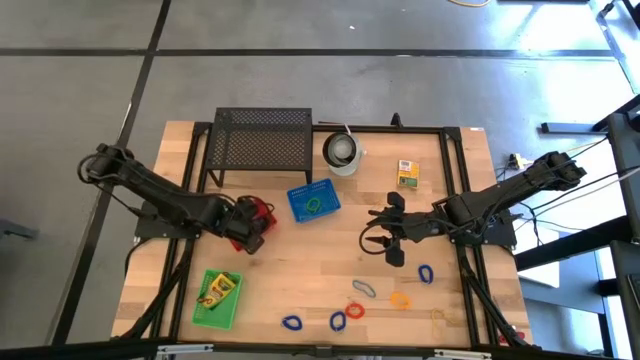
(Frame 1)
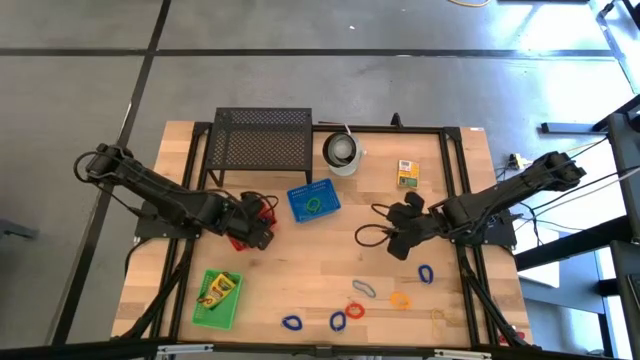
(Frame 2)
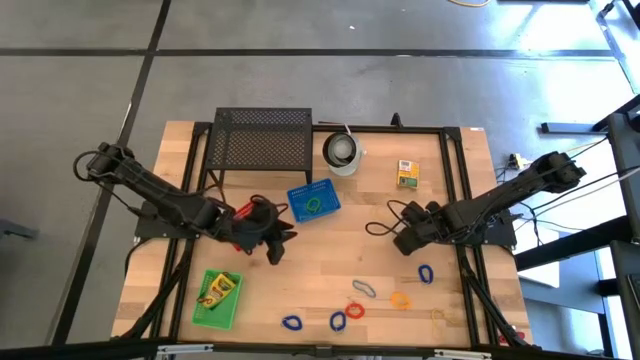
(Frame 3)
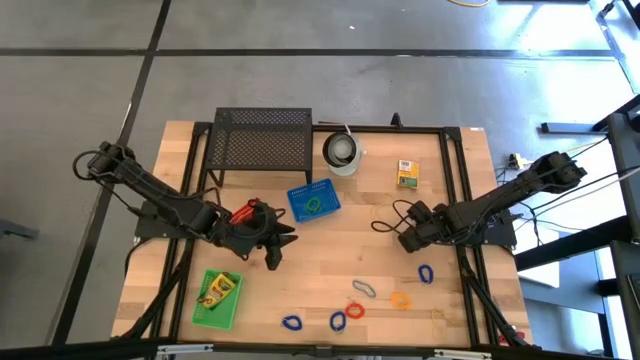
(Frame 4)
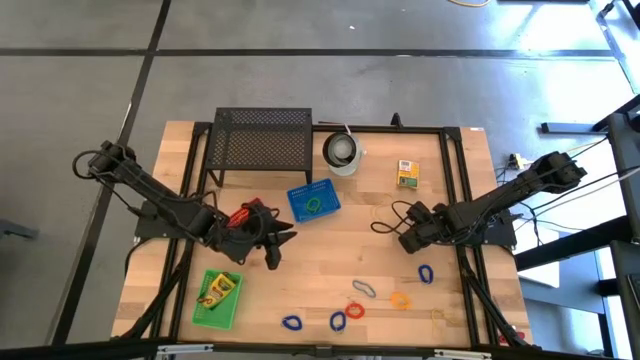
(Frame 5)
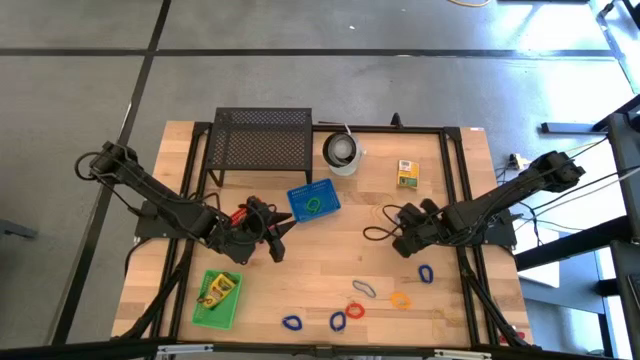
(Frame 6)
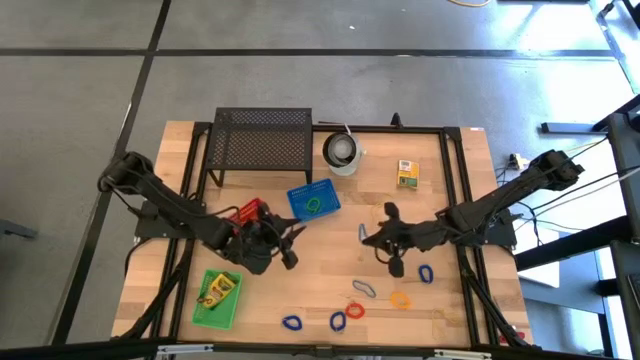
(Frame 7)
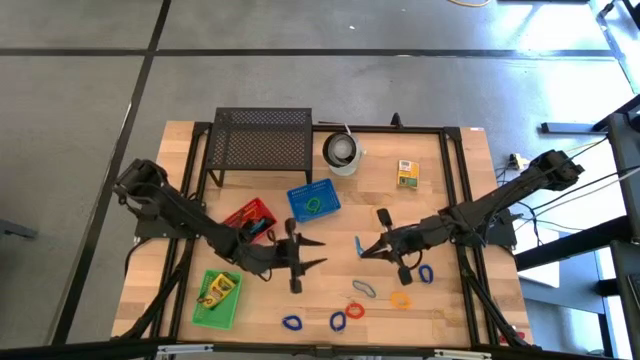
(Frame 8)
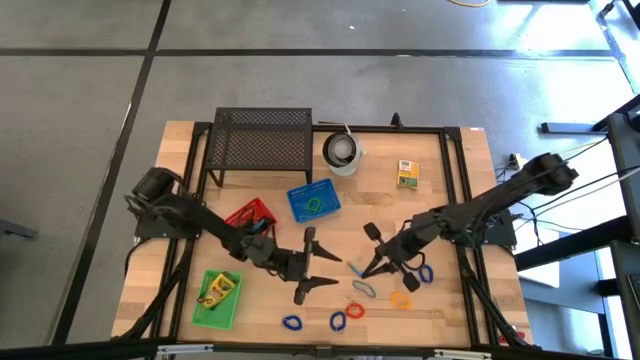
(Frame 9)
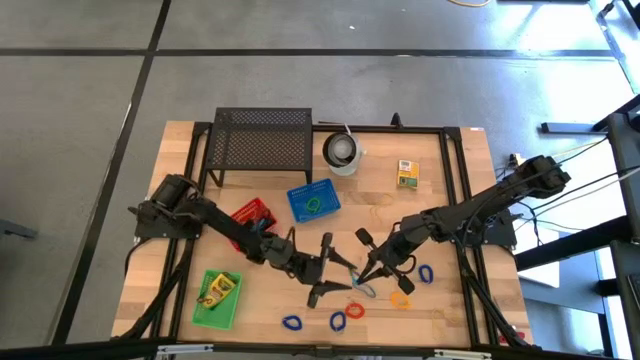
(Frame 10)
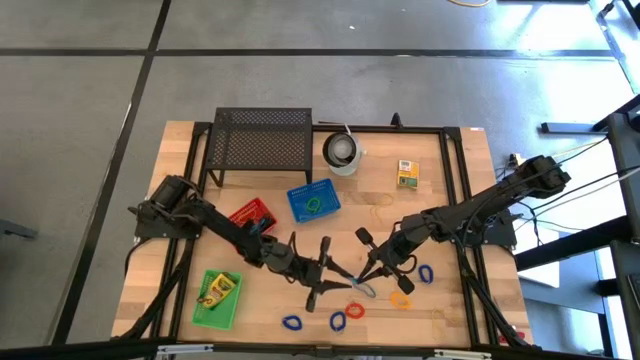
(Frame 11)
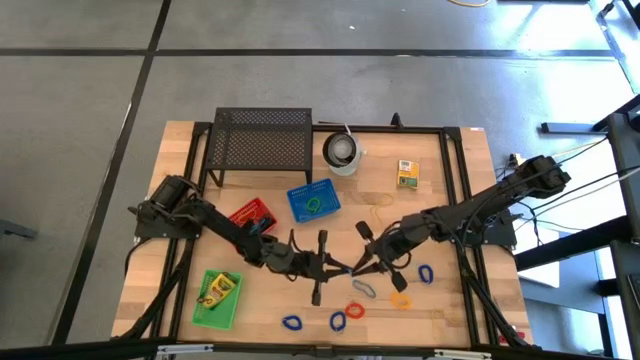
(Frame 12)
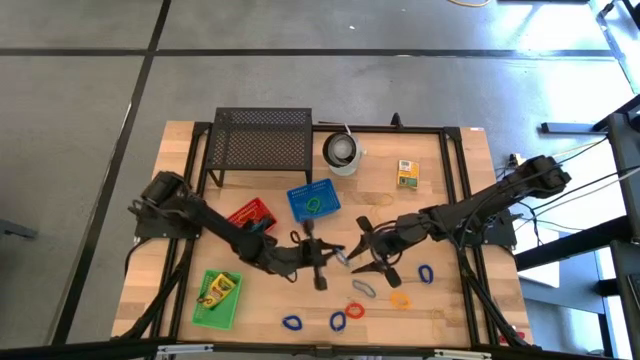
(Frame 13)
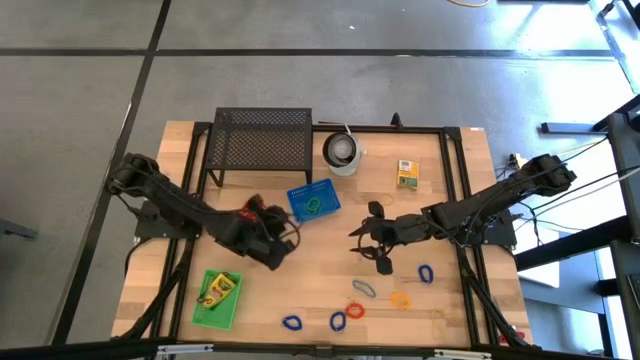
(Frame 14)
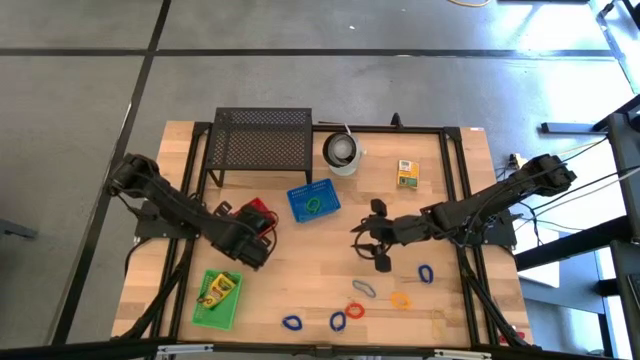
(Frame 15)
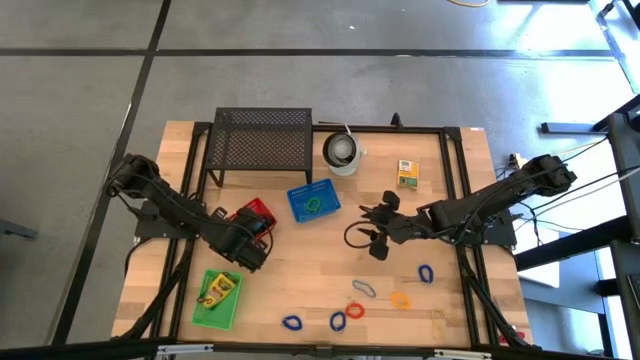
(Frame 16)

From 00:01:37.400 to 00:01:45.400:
Task: Pick & Place Office Desk Supplies
Put the blue rubber band into the red bin

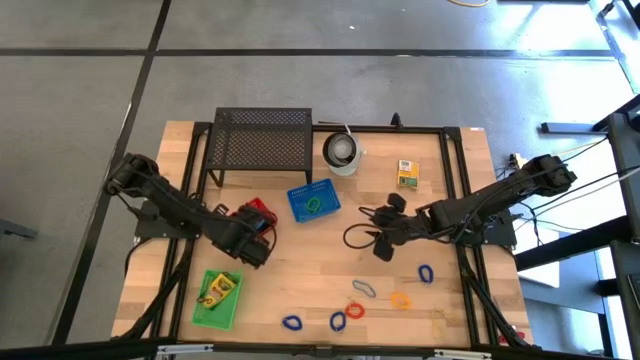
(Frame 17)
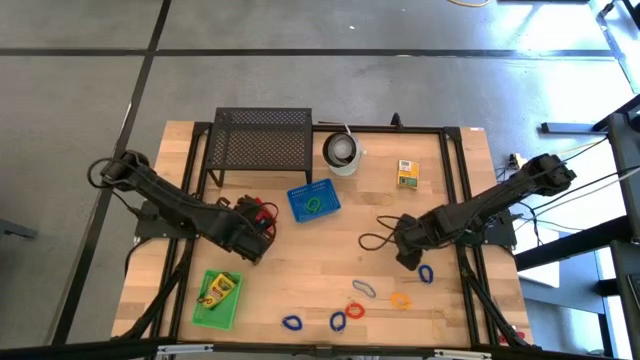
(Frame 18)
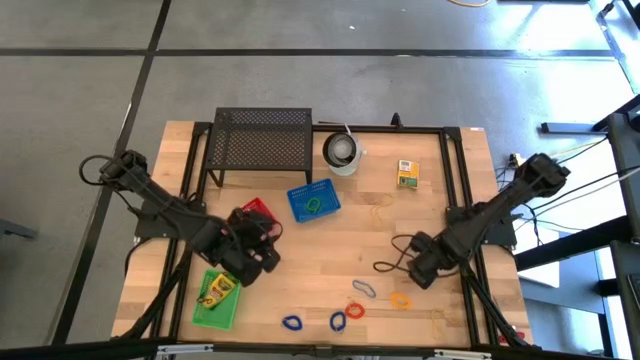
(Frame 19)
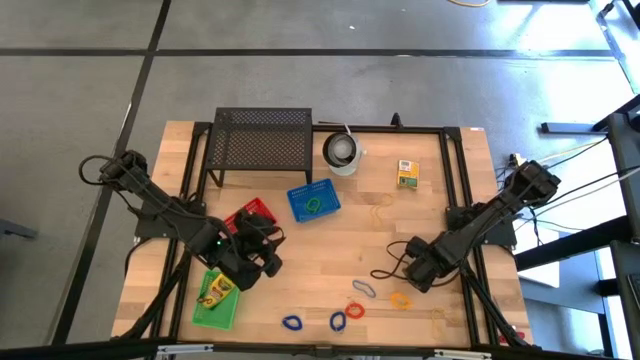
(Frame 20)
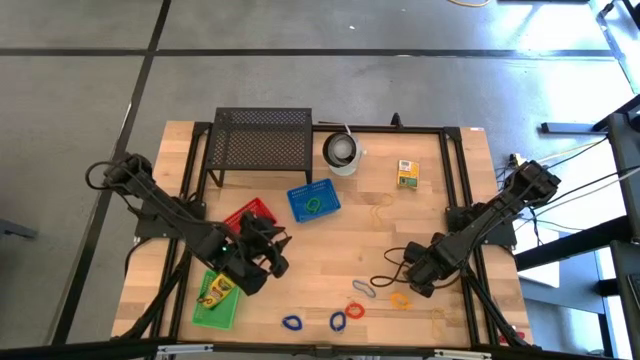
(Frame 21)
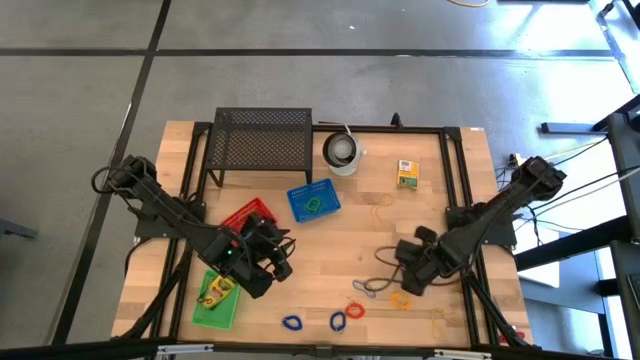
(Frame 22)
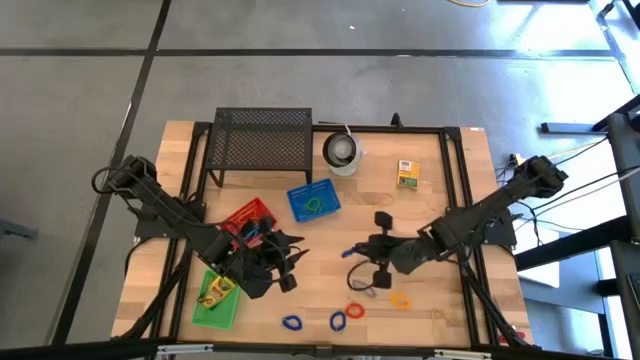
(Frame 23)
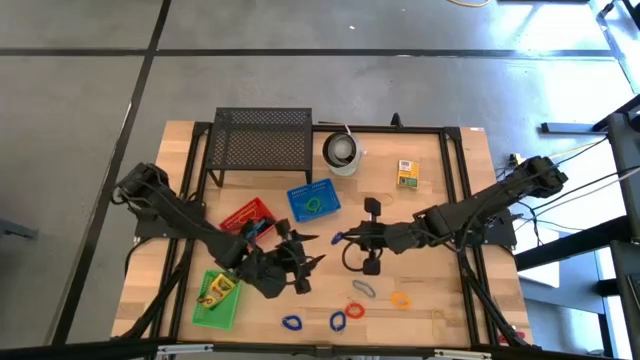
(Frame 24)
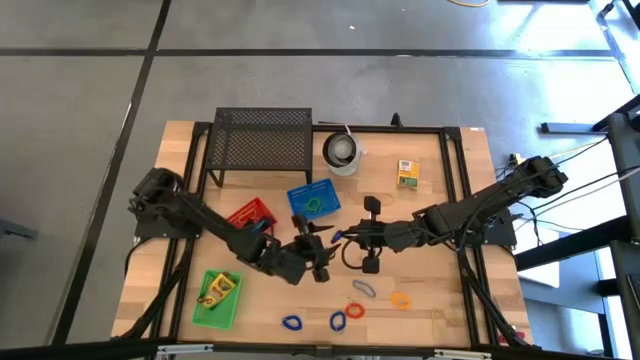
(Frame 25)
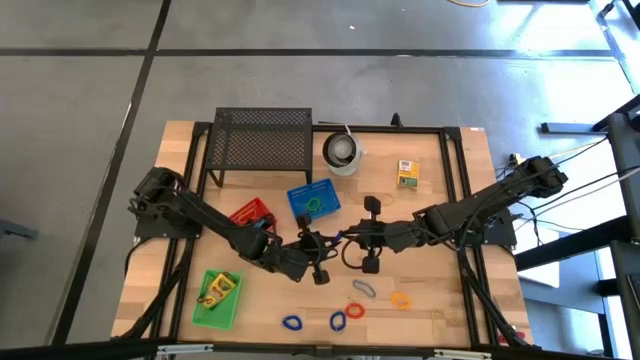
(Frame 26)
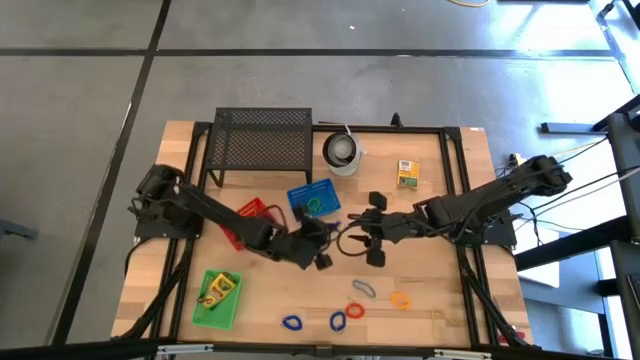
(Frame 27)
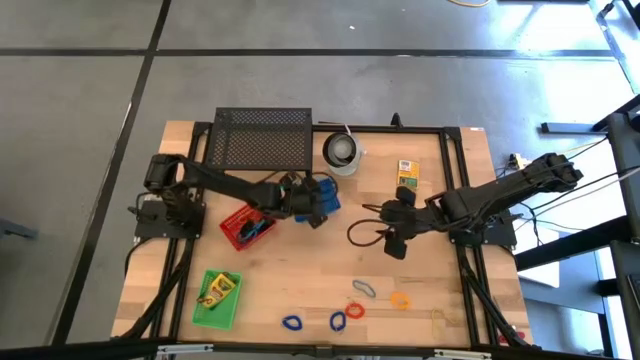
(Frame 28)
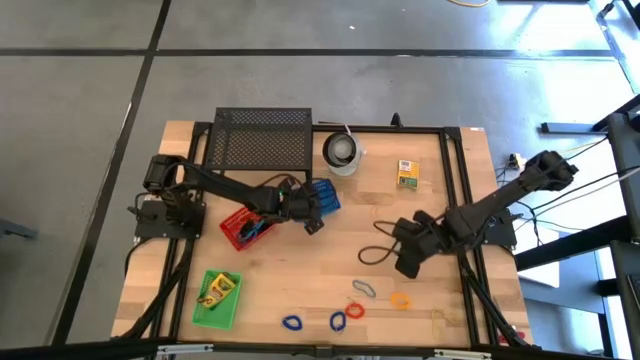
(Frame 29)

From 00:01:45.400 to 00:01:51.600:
Put the blue spring keychain into the blue bin

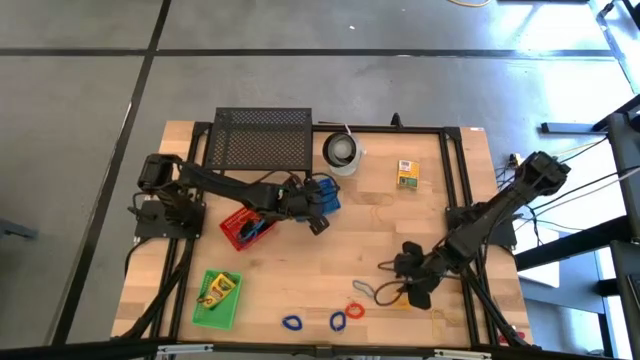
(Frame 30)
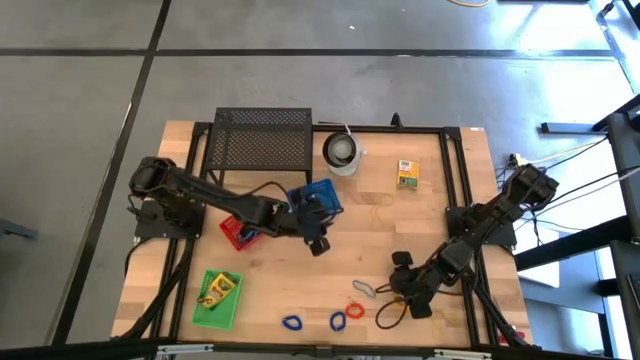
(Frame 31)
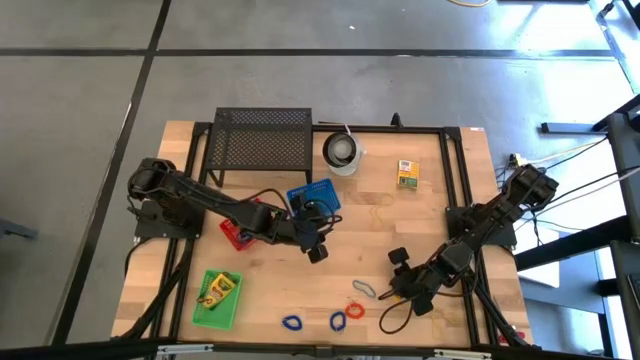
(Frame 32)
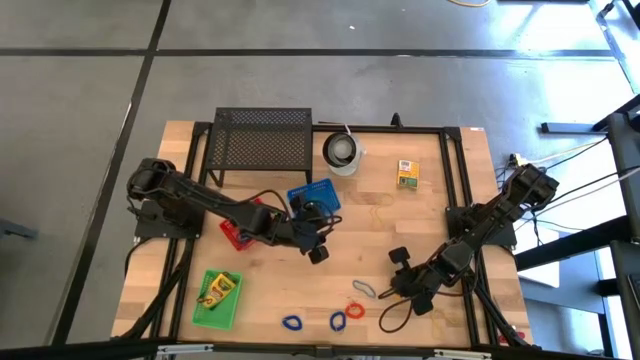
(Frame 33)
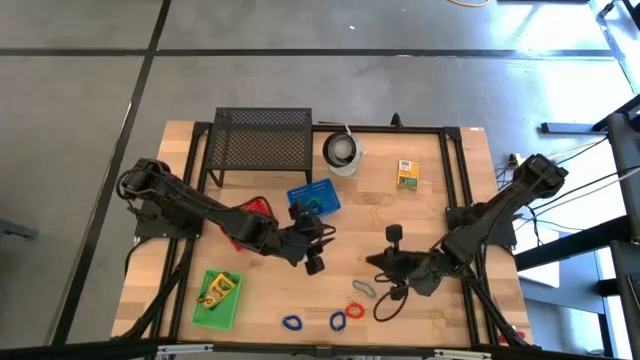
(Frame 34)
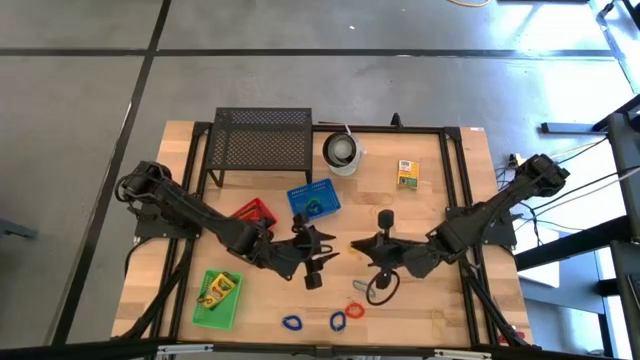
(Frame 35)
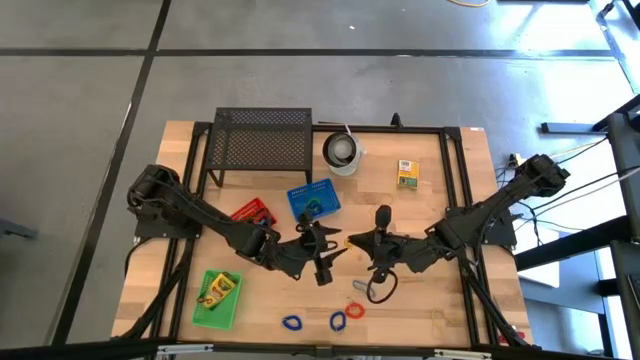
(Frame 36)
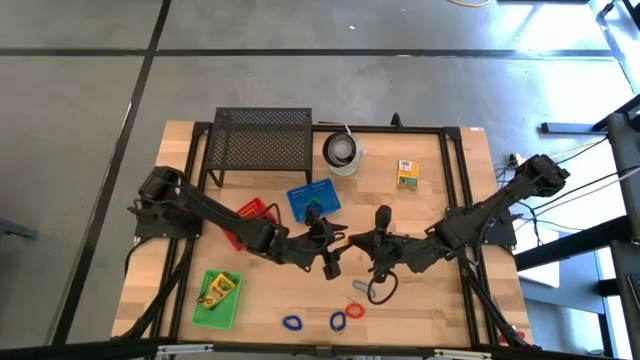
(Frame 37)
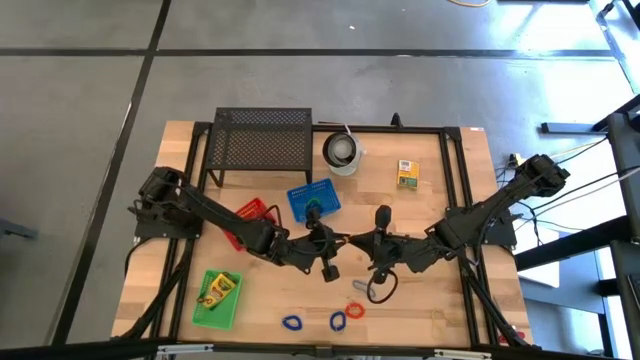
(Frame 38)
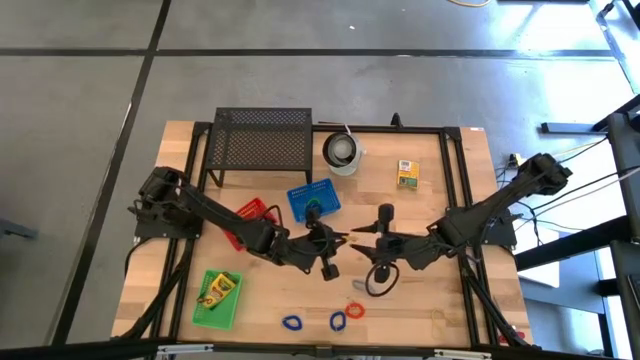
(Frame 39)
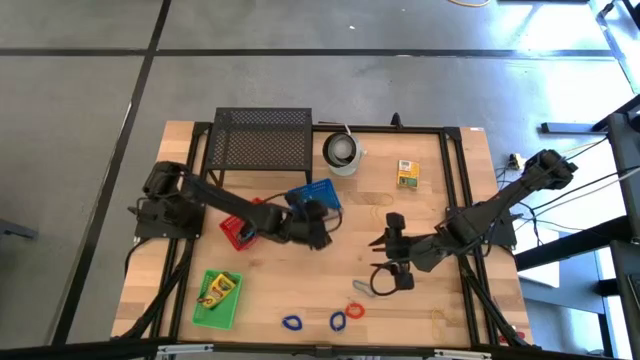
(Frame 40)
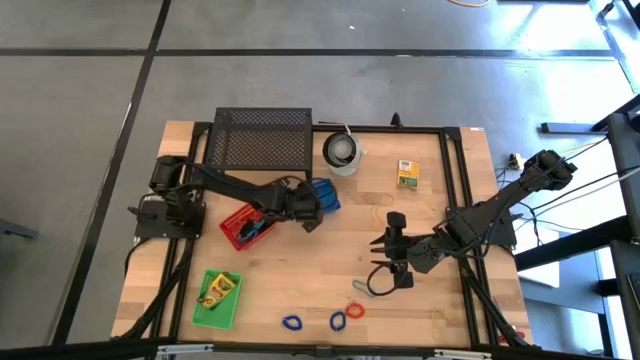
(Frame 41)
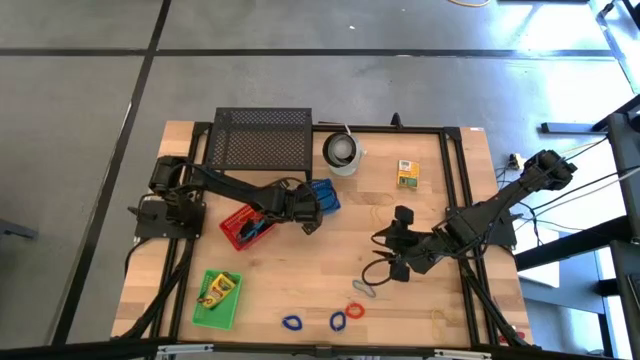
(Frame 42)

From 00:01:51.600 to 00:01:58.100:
Put the yellow spring keychain into the blue bin

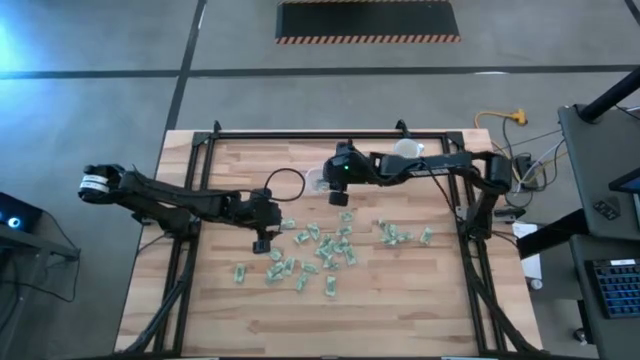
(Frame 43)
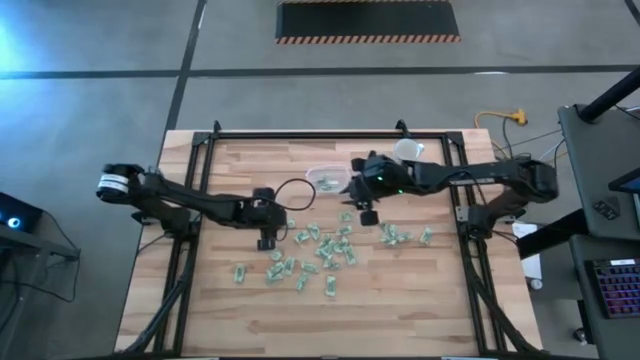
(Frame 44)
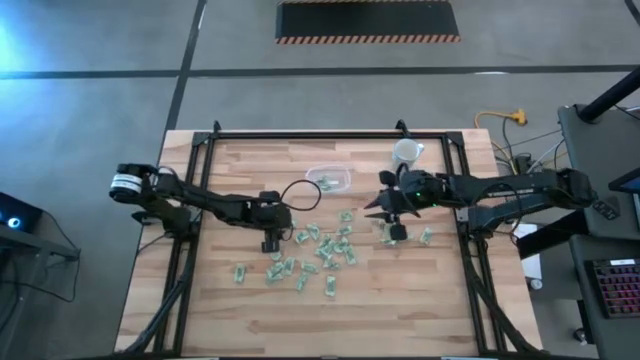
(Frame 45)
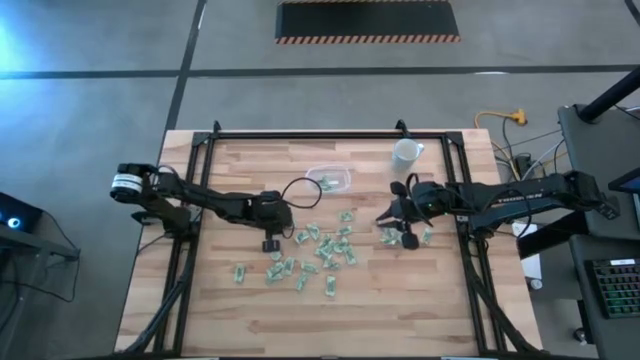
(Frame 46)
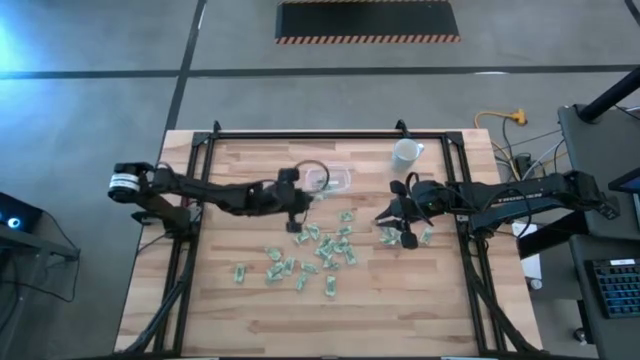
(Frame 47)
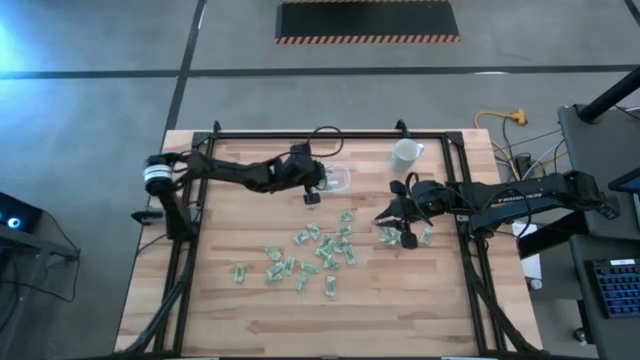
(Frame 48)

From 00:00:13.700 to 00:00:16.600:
Task: Pick and place Stevia / Truvia into bins
Put the stevia packet into the transparent container
